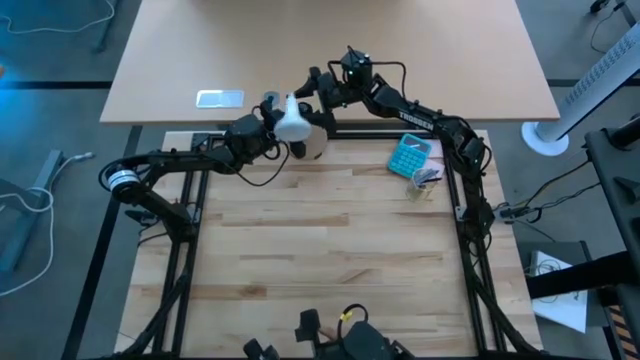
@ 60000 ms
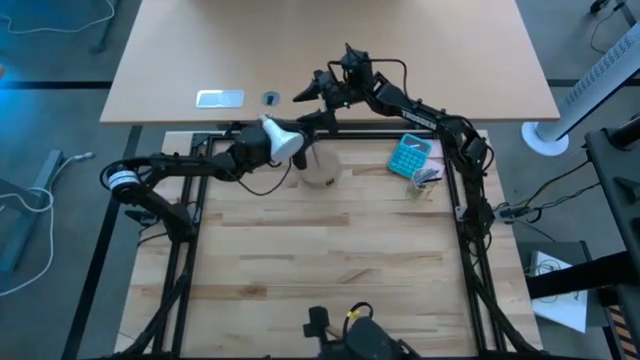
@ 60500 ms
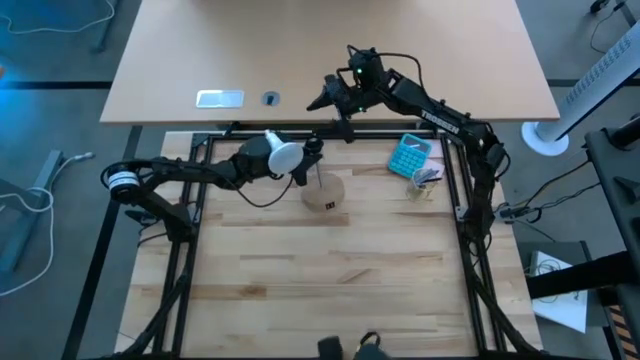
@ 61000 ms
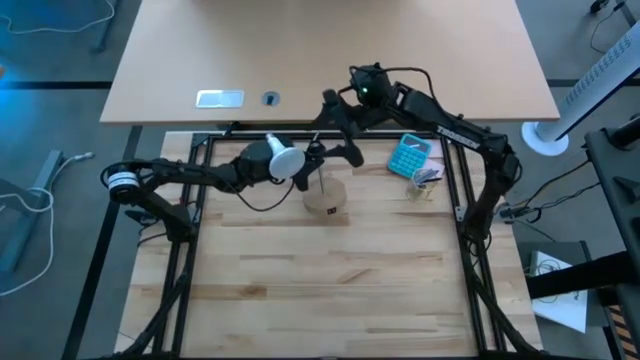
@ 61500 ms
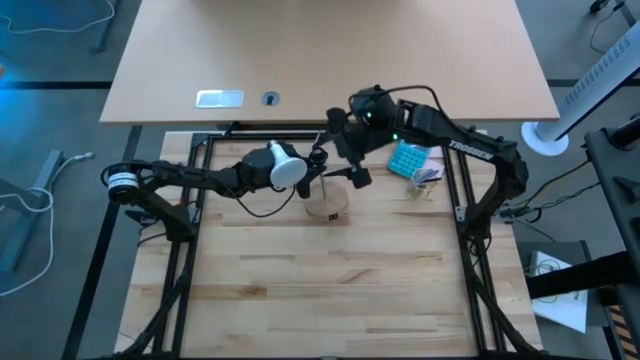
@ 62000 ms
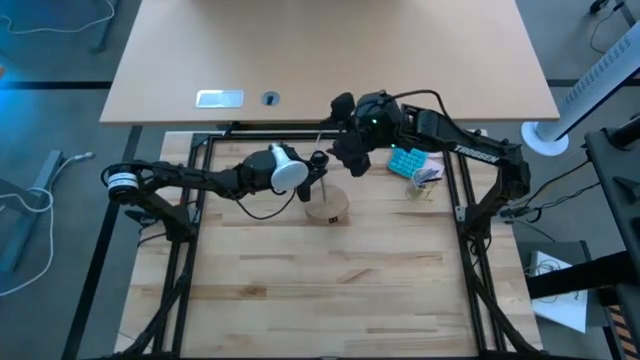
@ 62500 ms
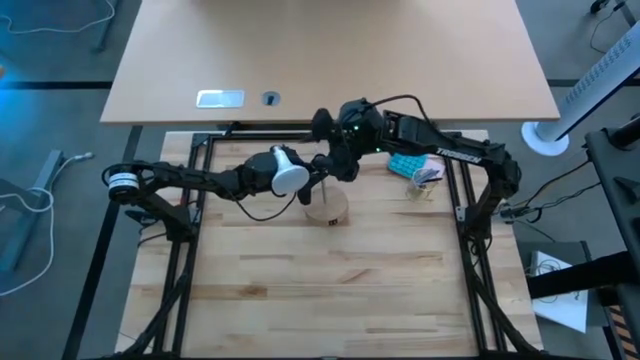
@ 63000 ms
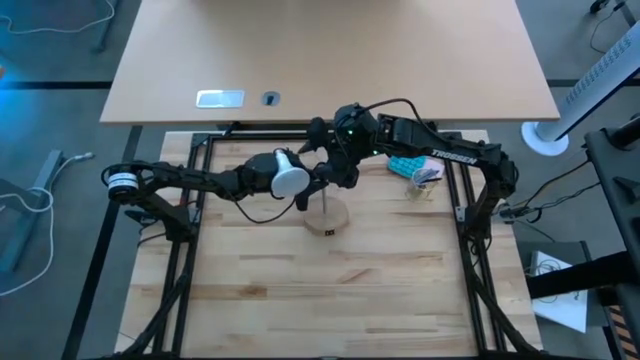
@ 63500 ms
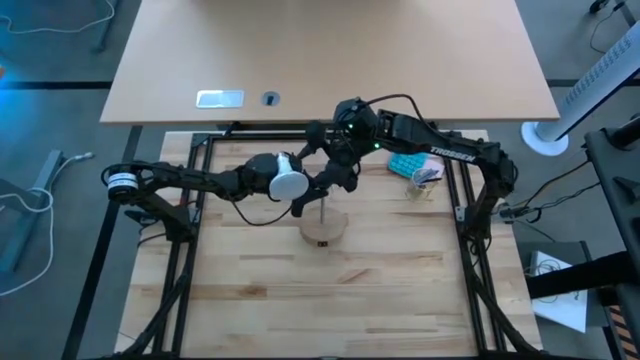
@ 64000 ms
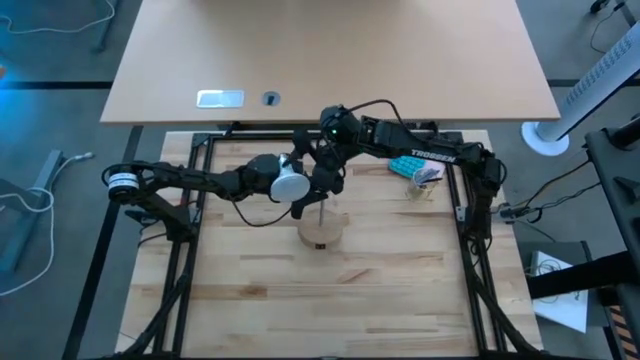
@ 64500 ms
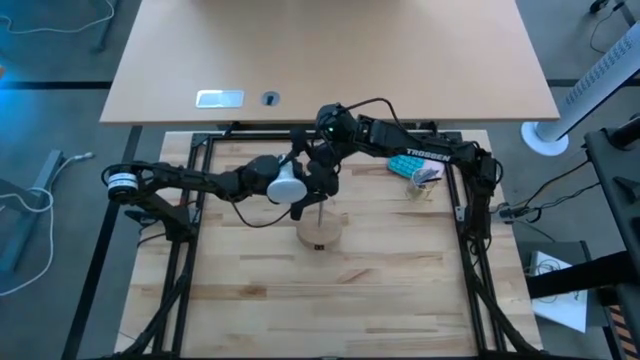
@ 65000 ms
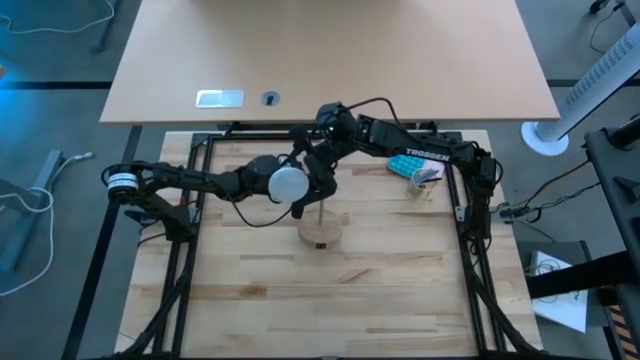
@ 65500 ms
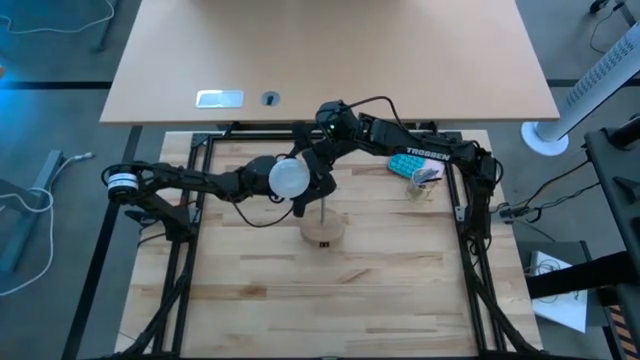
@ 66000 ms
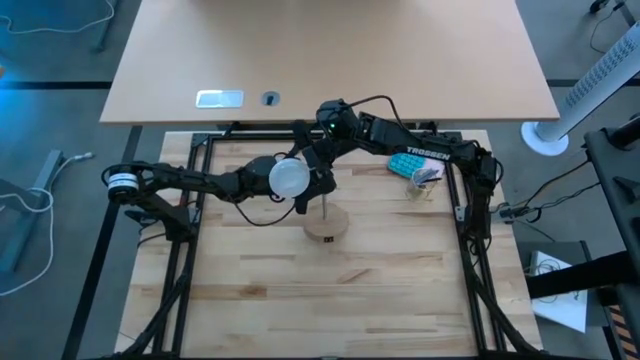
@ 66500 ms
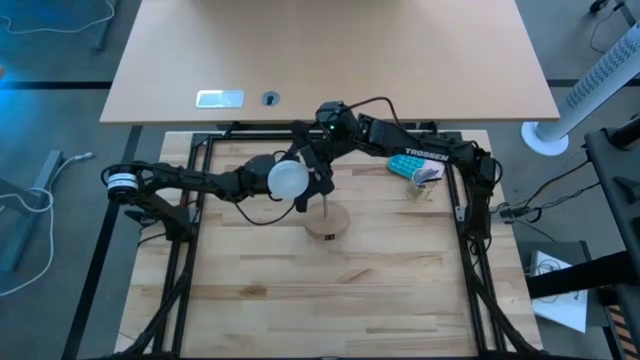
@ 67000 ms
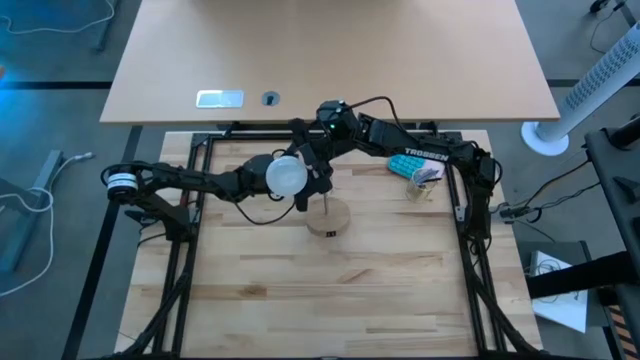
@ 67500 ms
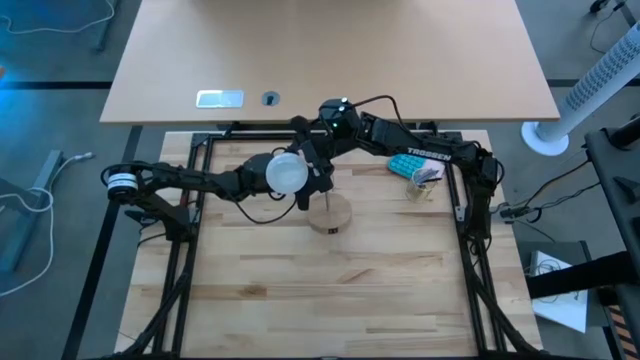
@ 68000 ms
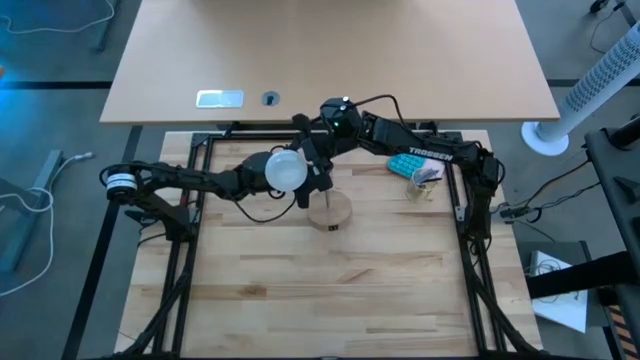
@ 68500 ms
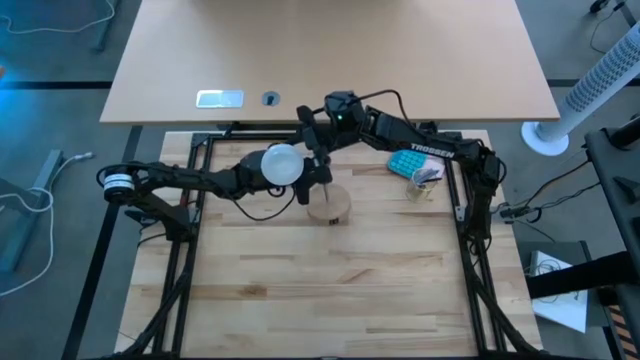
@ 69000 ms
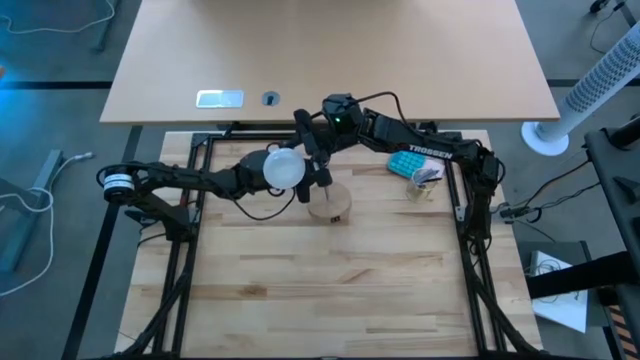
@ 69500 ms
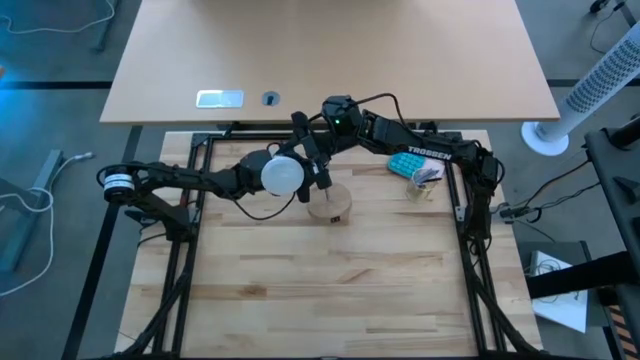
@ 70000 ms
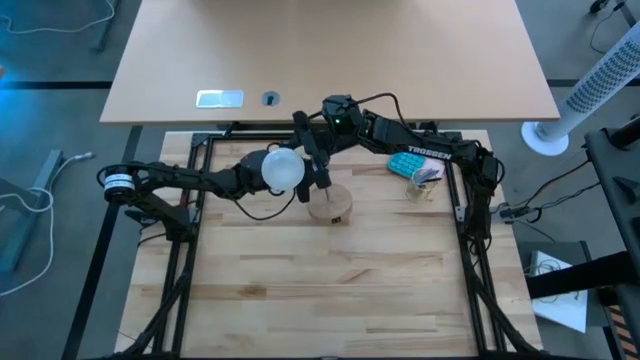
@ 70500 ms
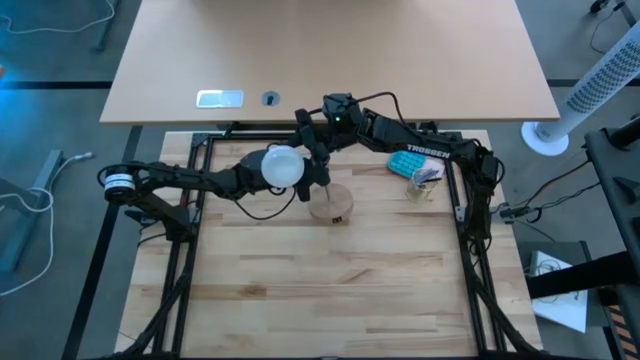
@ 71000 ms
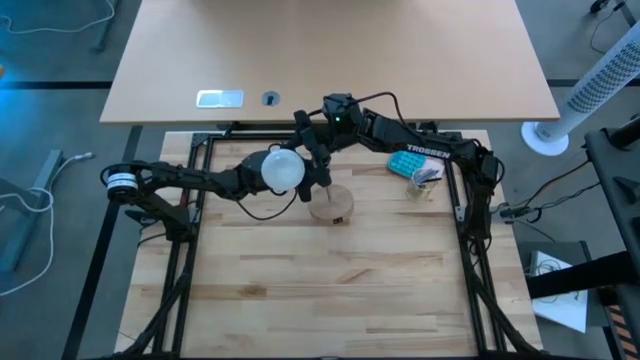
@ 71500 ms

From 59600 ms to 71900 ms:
Task: Screw lightbulb
Insert the light bulb into the table lamp

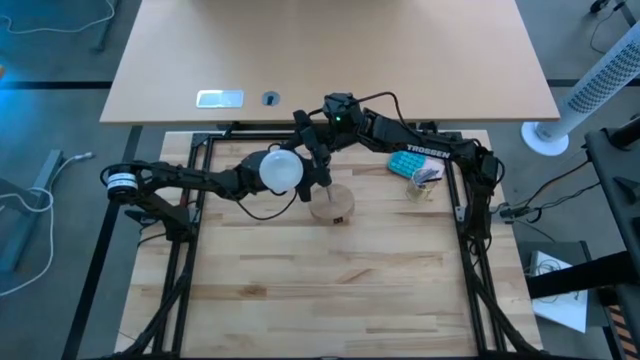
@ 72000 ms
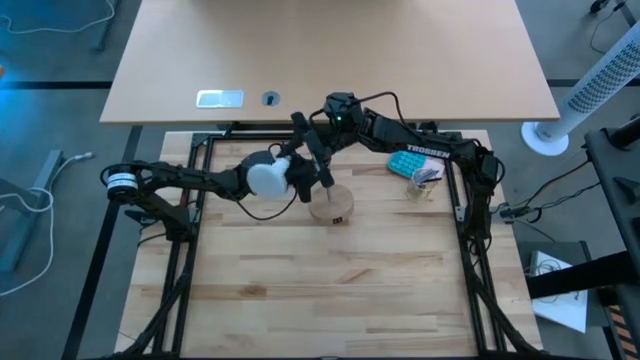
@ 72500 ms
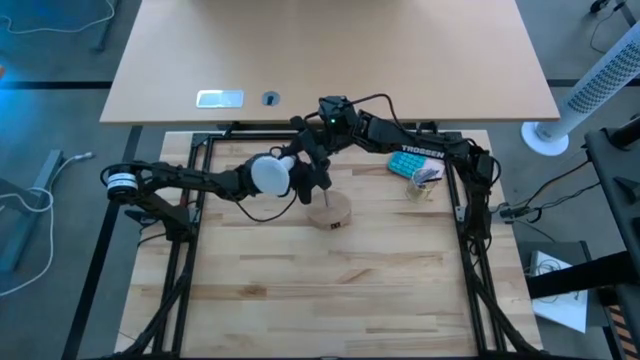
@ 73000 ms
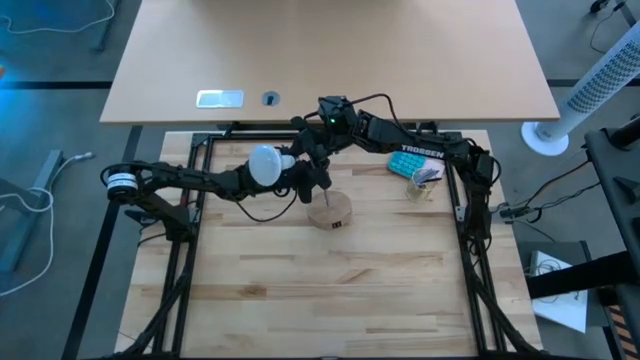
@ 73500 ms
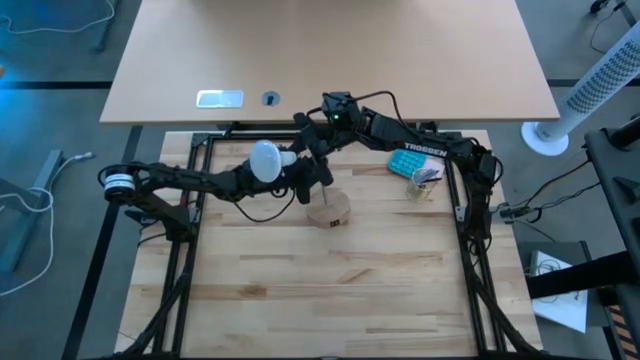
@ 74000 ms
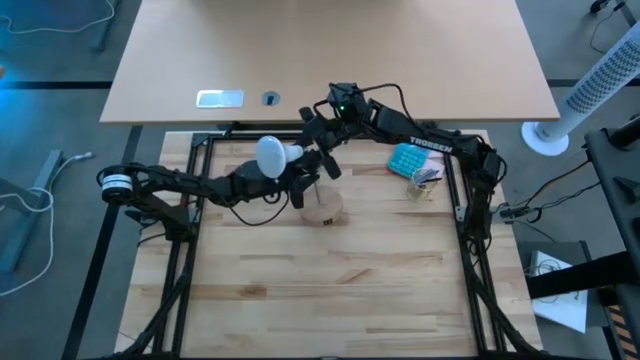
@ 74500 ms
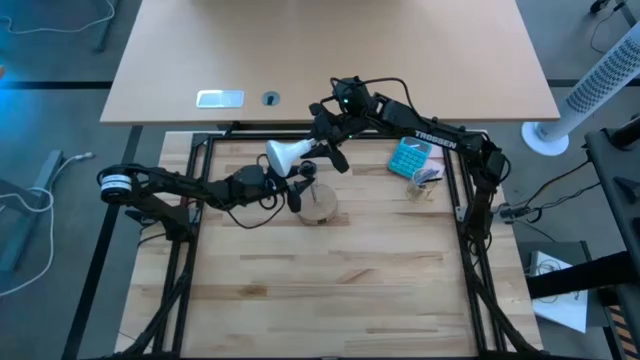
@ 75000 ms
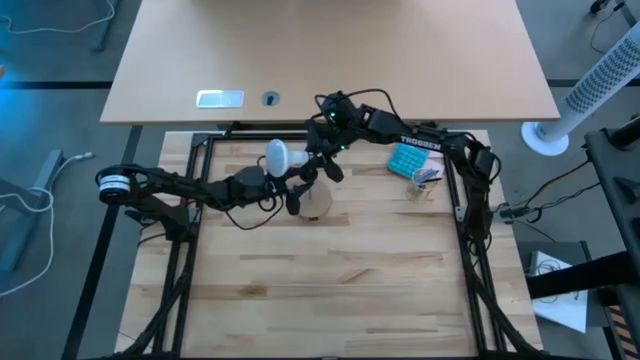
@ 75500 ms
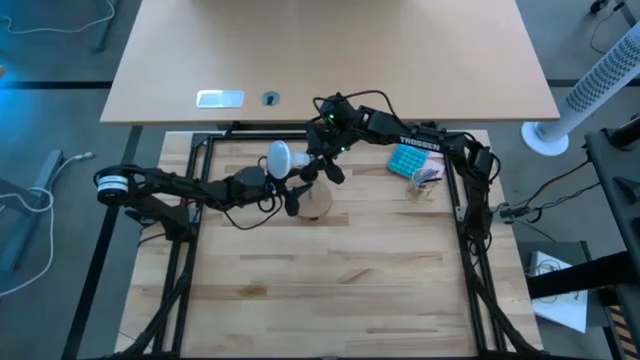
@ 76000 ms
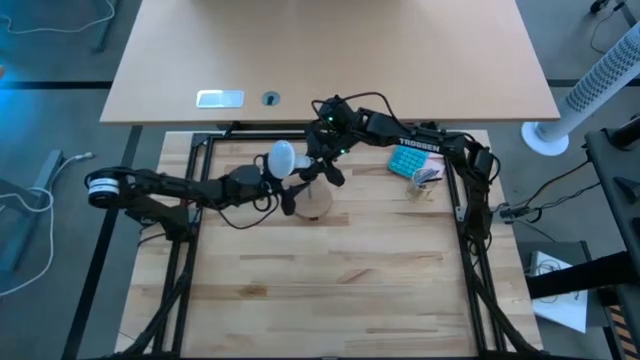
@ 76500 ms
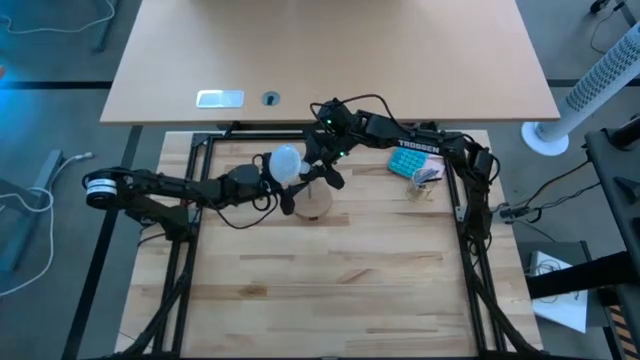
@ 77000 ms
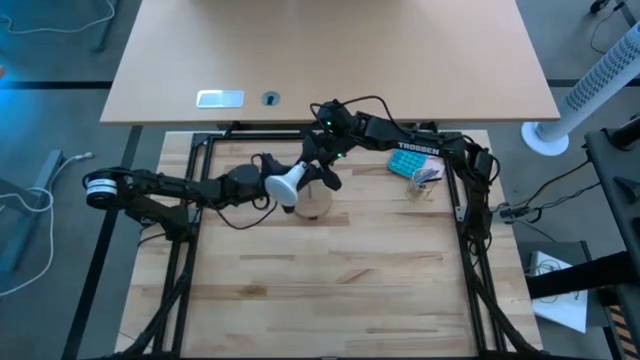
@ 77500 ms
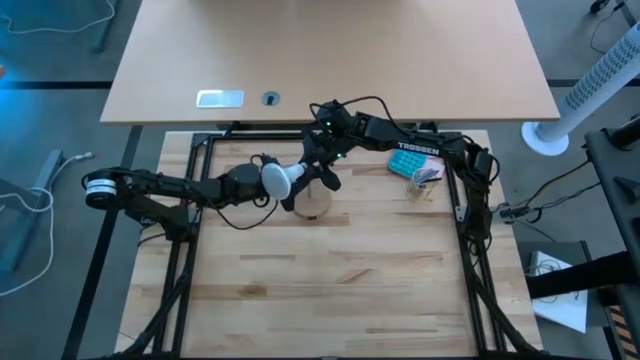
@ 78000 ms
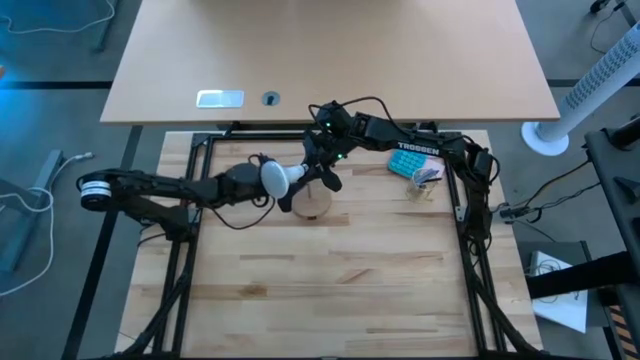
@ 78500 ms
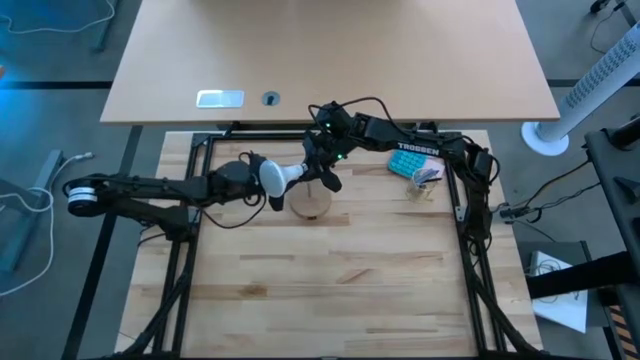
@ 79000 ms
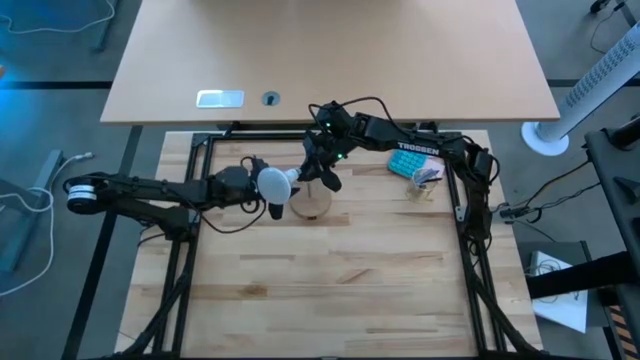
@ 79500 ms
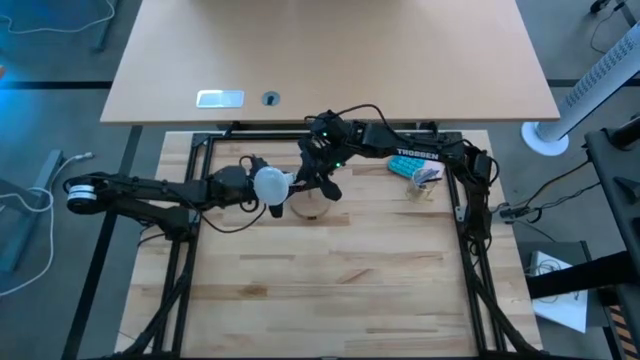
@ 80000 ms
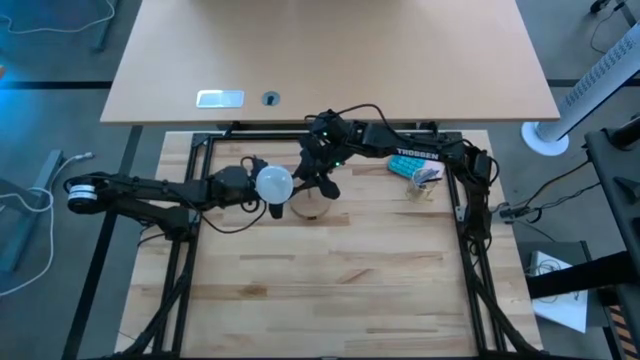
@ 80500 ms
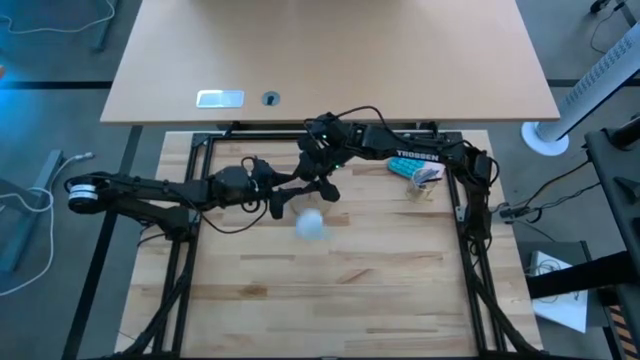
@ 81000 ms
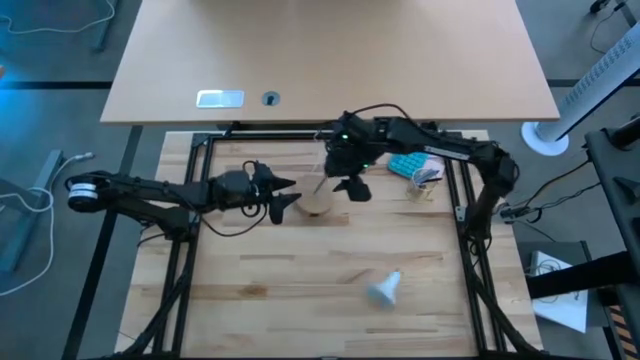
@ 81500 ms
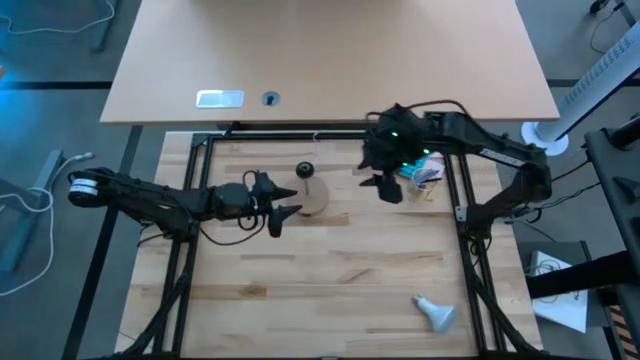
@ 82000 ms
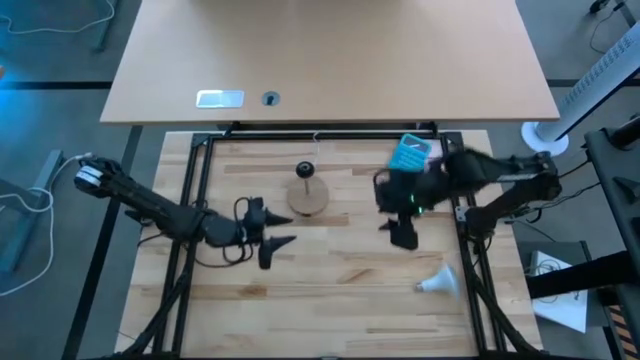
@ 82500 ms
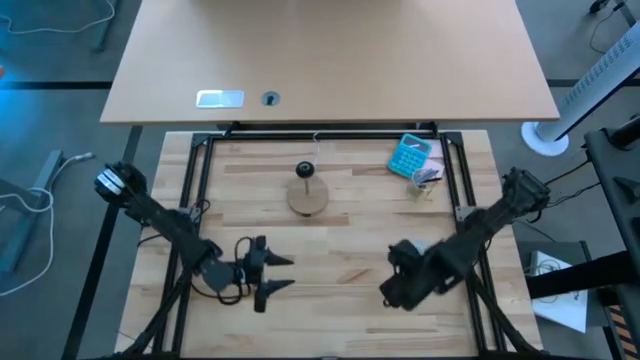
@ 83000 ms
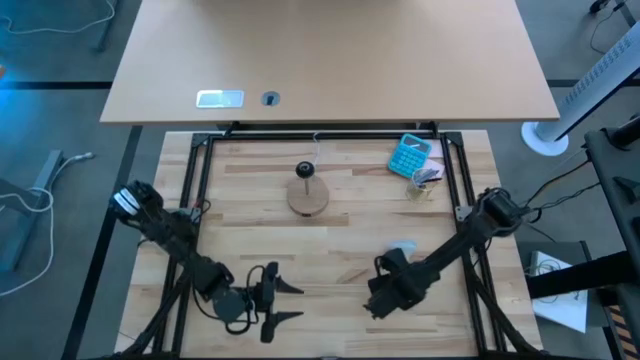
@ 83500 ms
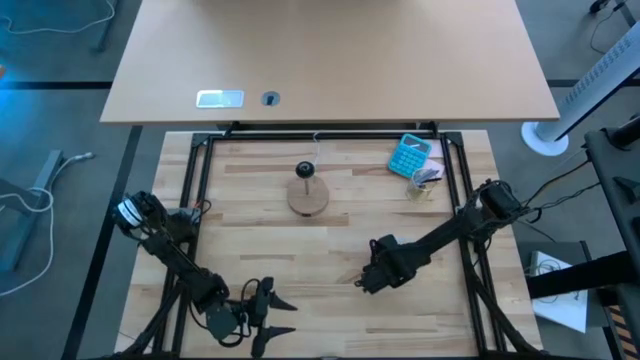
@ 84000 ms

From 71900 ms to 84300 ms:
Insert the light bulb into the table lamp
